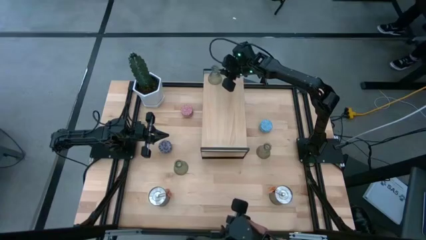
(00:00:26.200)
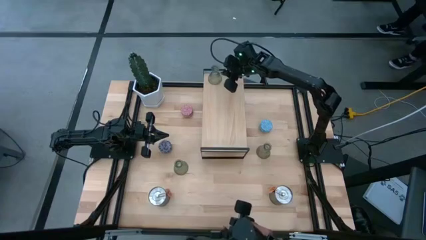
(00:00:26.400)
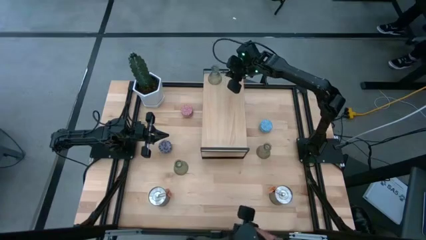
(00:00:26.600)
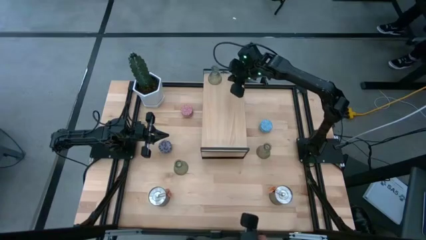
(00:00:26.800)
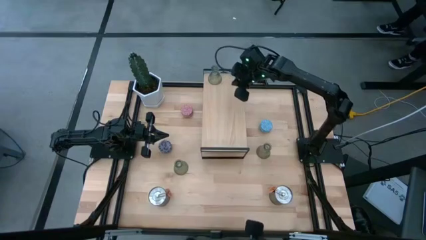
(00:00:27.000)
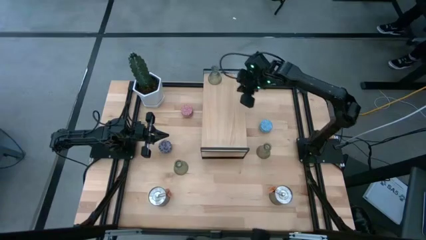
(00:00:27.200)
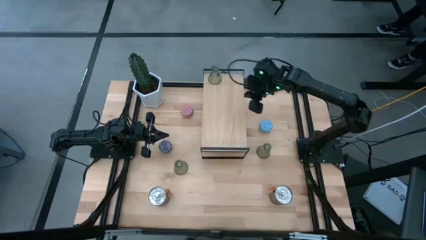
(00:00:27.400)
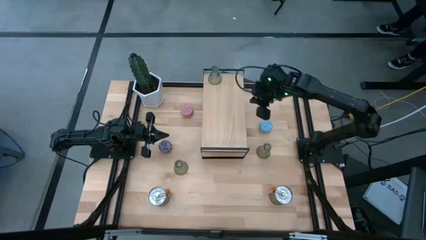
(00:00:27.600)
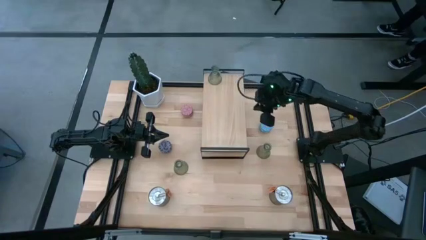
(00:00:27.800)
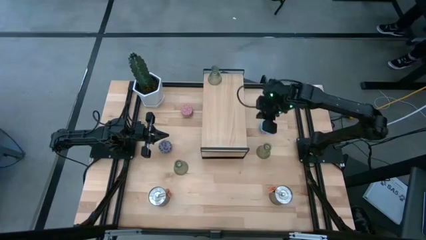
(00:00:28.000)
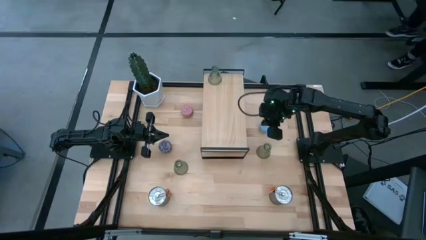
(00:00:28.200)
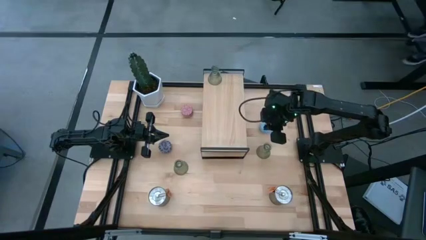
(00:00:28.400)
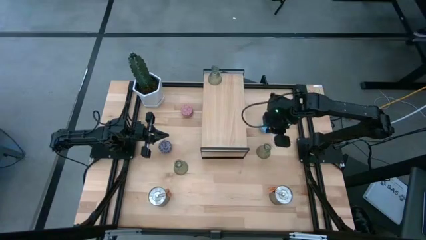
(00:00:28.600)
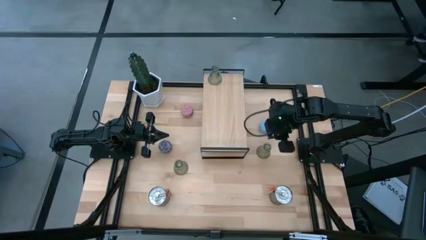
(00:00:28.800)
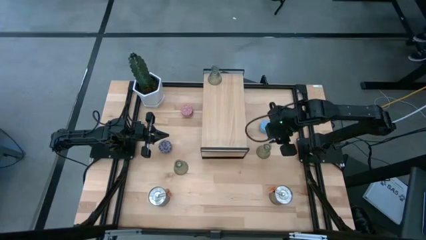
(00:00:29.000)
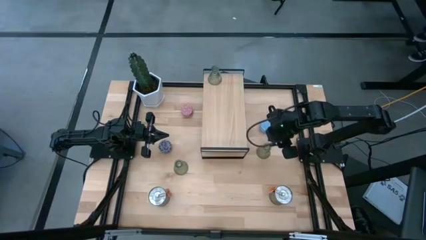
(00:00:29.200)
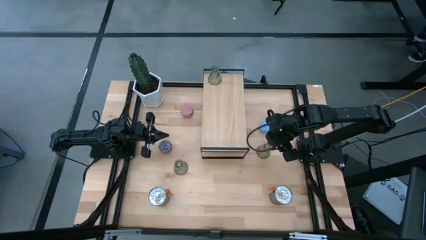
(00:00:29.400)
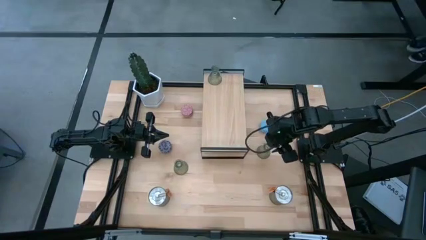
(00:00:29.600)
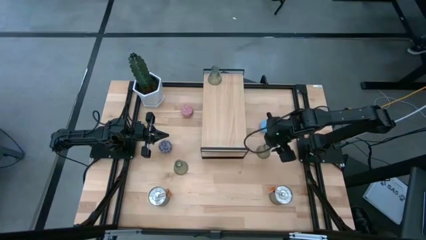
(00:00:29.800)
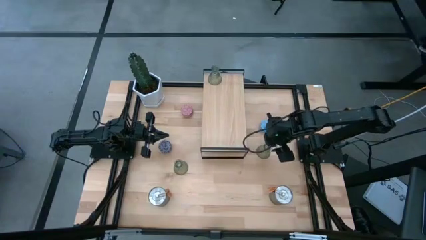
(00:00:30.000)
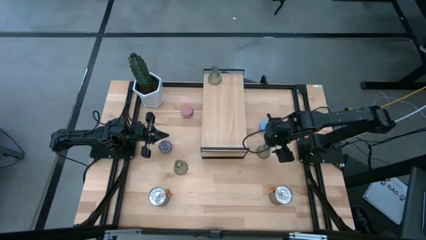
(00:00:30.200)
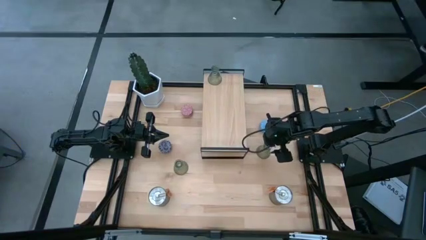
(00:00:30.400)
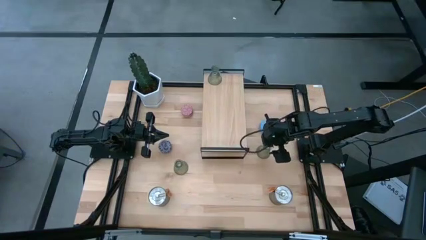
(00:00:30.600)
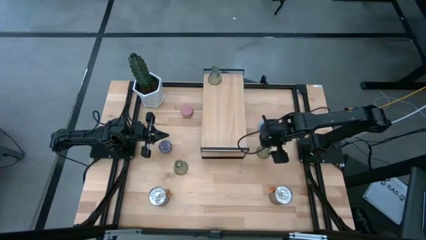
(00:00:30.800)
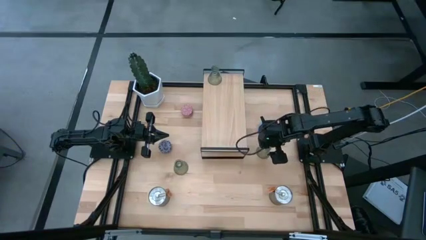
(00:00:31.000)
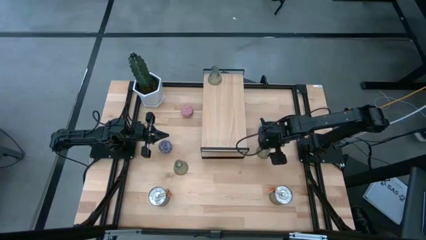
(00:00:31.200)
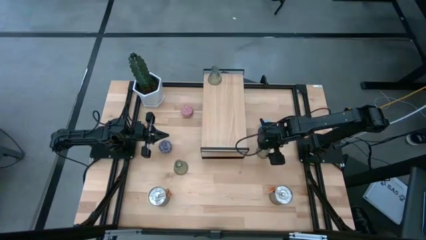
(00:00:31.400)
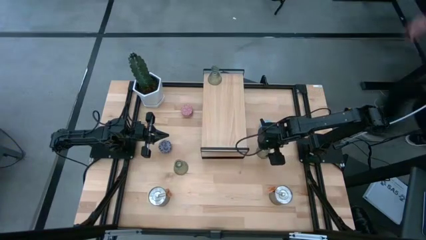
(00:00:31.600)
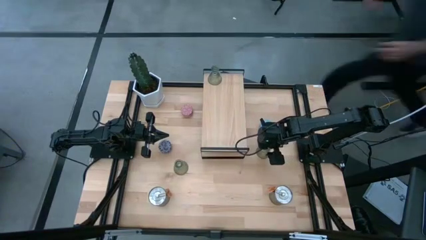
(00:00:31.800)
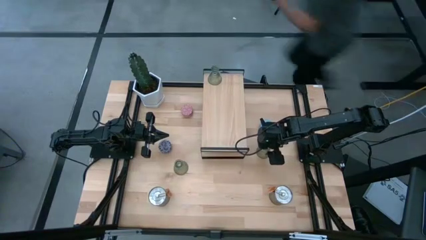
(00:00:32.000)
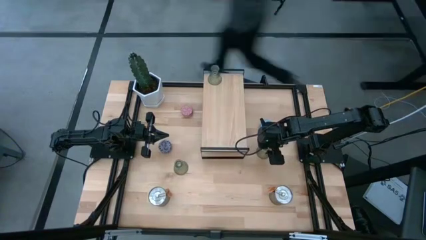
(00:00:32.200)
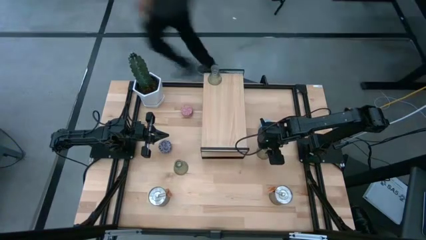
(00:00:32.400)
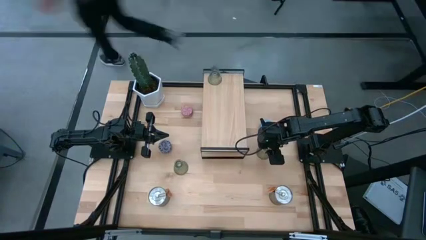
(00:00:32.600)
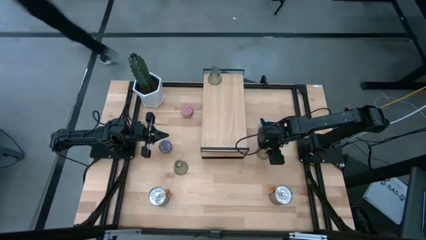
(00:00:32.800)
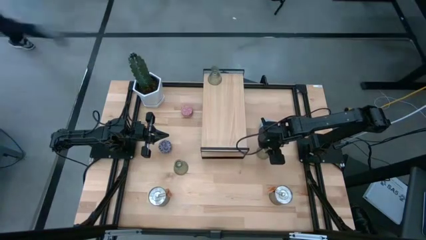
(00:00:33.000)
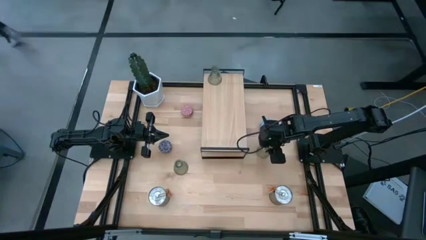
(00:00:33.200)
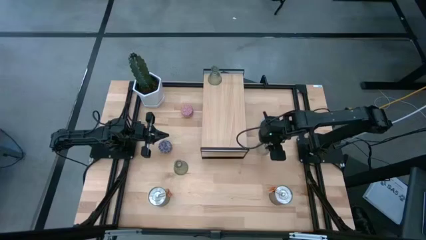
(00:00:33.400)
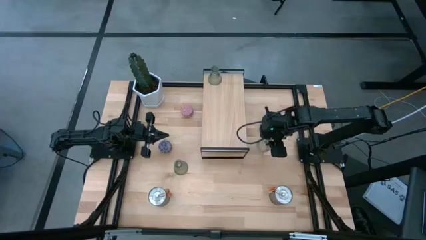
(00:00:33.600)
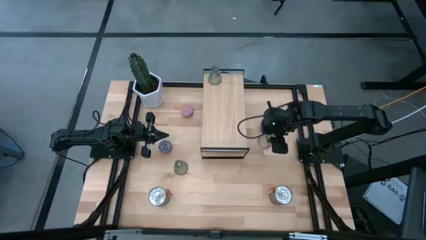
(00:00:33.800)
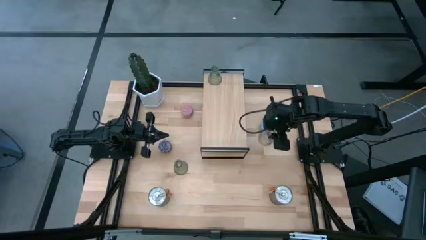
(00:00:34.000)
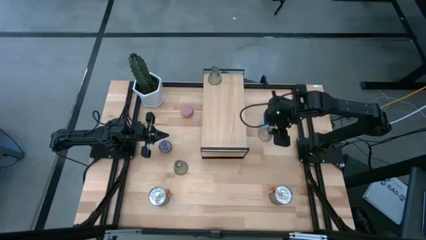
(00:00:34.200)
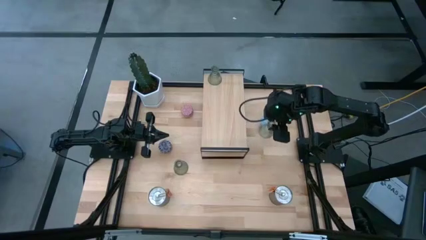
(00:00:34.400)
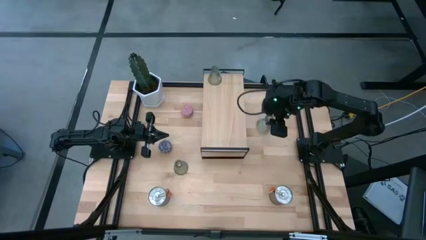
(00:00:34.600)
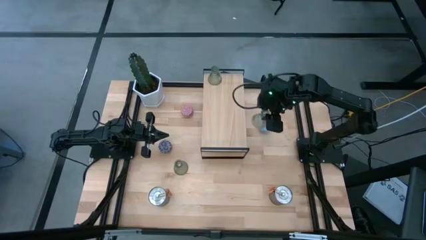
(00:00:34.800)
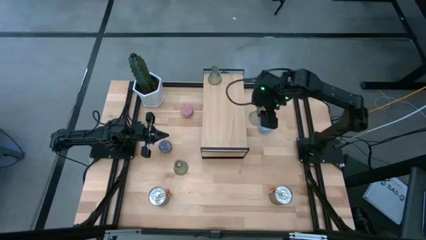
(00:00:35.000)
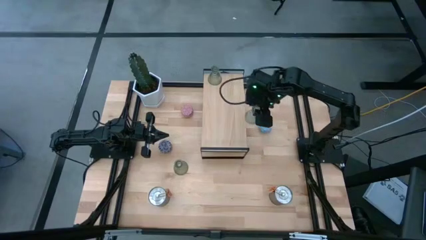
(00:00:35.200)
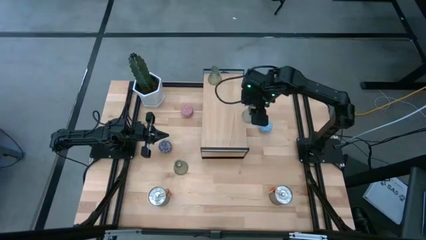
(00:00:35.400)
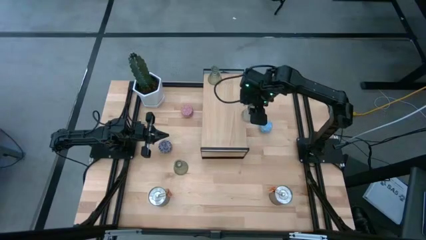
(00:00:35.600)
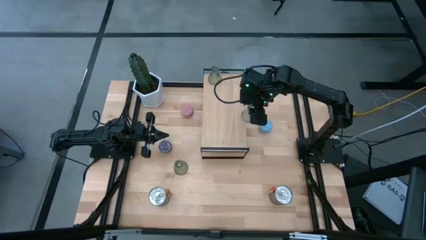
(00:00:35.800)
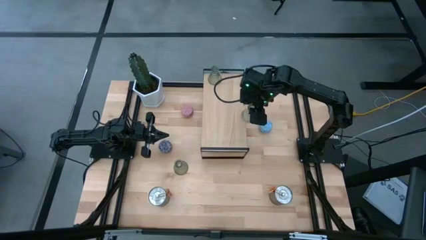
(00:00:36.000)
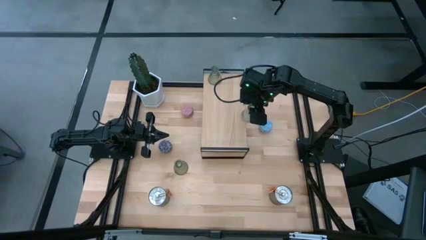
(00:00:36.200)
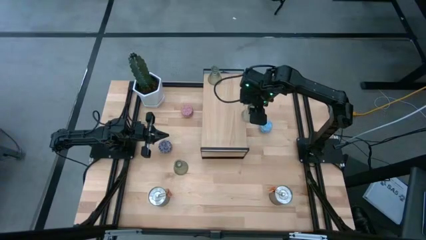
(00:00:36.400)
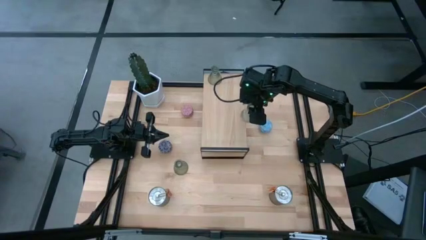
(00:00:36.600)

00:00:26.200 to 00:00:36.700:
Task: Pick & Place candle stick holders
Put the right transparent candle holder on the shelf

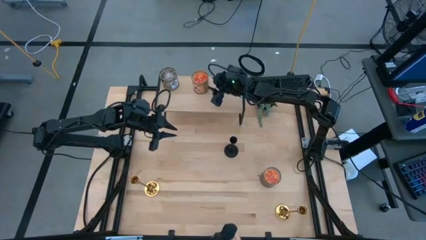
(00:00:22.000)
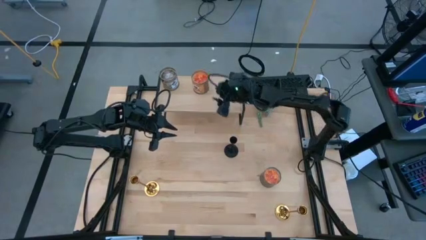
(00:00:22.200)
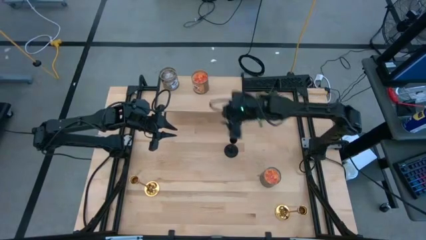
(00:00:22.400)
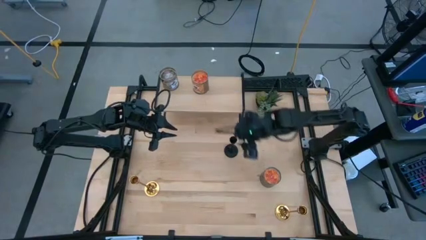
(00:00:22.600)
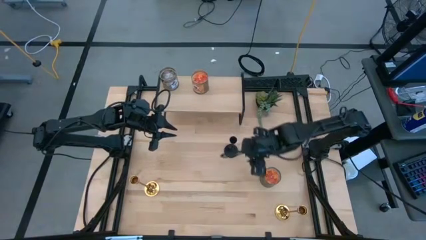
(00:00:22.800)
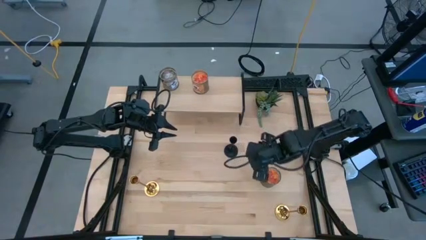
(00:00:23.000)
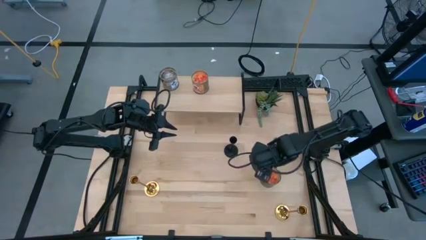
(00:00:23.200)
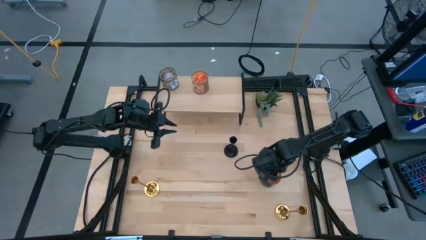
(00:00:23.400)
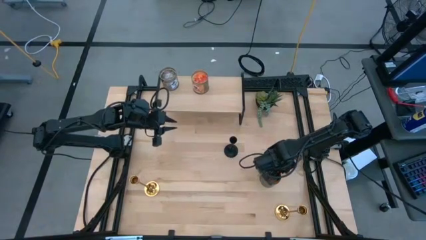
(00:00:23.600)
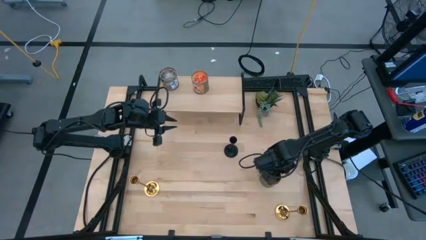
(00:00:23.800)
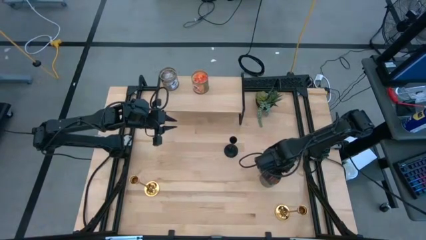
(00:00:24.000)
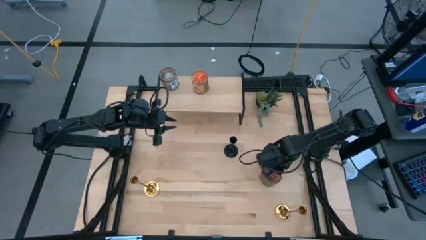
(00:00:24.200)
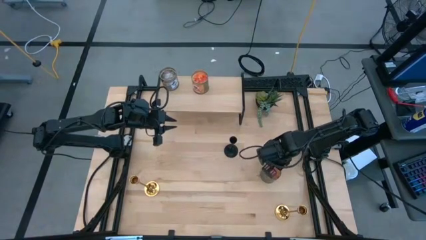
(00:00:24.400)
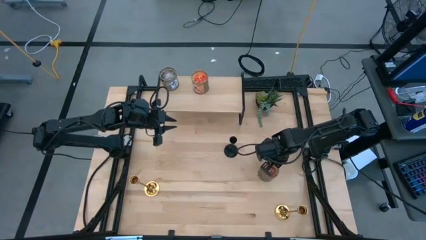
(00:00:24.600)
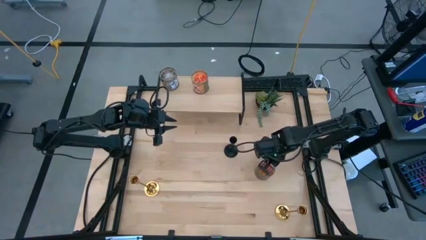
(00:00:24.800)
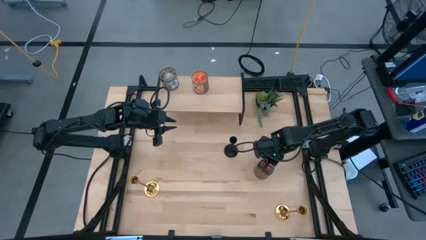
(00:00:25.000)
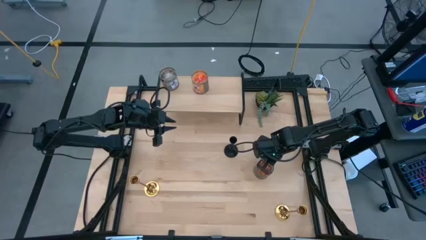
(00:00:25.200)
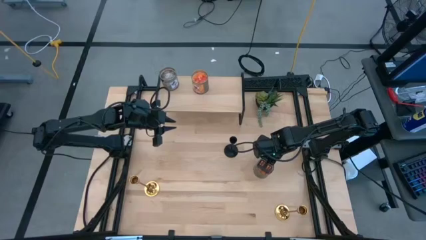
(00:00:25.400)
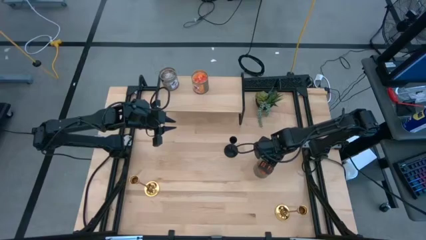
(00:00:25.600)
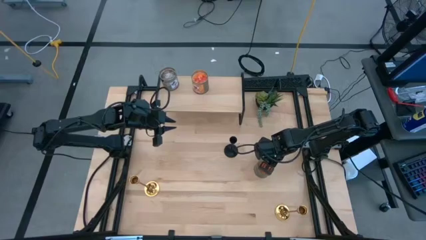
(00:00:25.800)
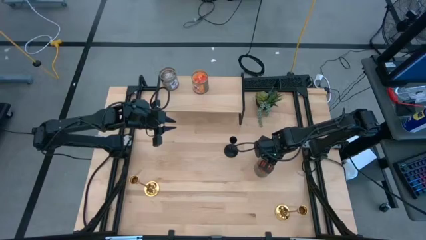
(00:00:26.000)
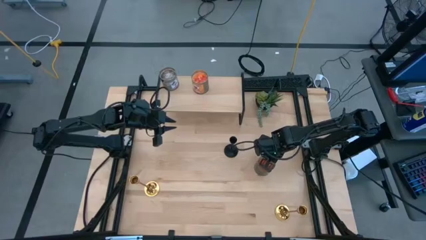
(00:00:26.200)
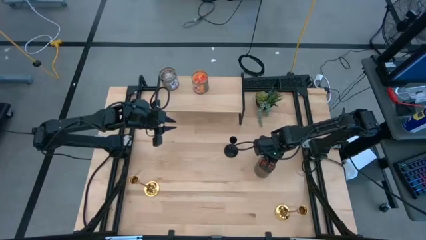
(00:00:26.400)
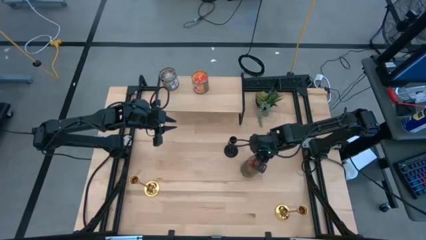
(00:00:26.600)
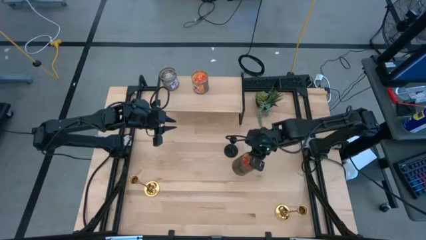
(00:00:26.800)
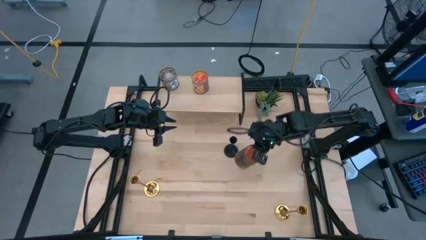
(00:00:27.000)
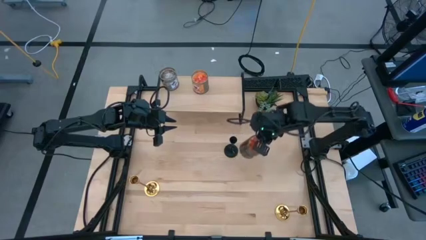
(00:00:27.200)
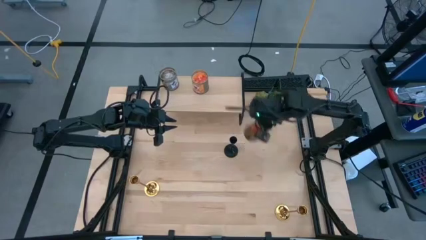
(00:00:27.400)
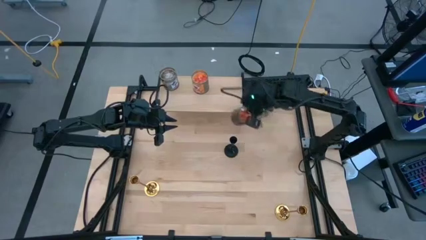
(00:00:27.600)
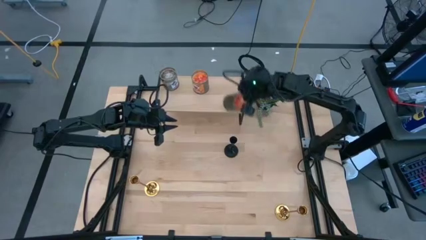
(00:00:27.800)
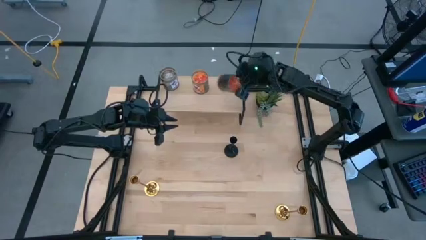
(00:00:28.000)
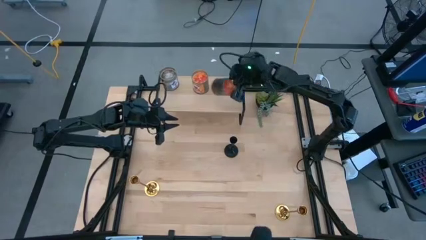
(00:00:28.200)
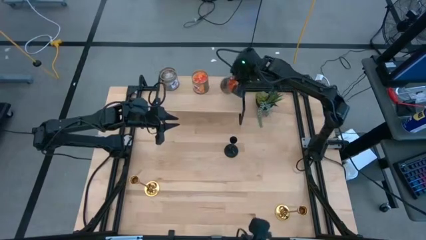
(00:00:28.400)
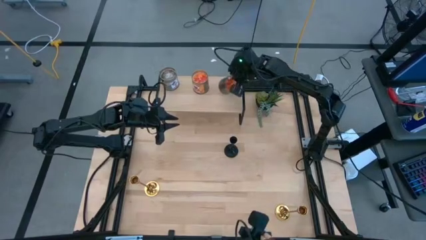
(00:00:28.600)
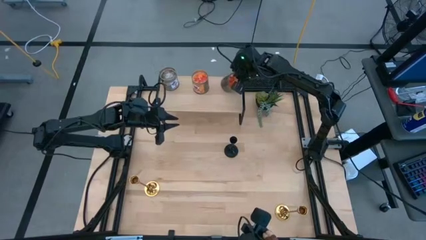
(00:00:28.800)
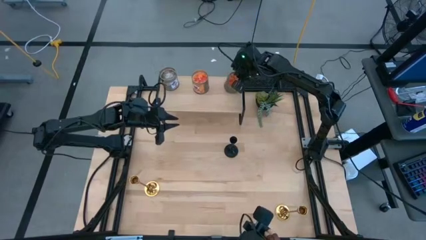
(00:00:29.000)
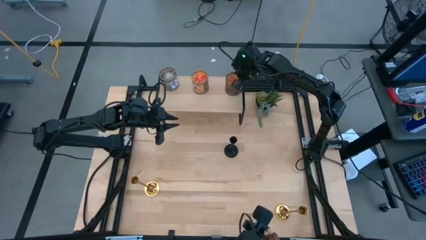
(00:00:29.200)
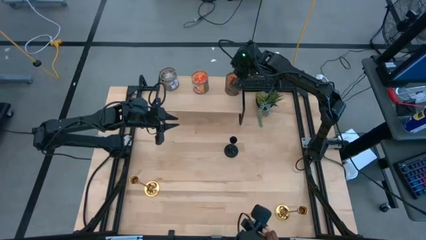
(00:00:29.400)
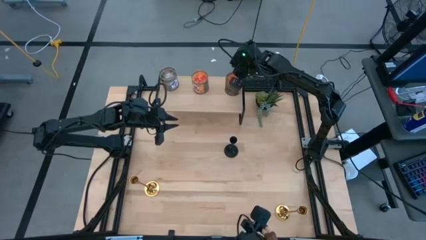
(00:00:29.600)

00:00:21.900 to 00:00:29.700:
Task: Pick & Place candle stick holders
Put the orange scented candle on the shelf
